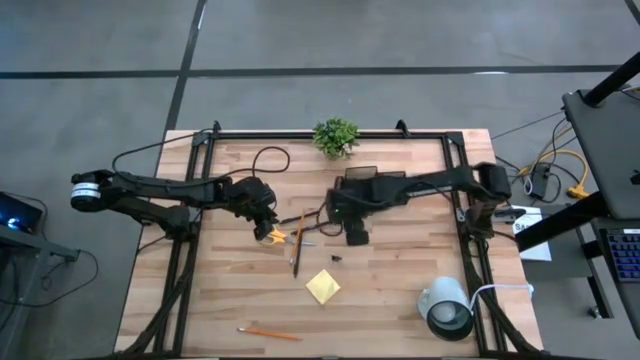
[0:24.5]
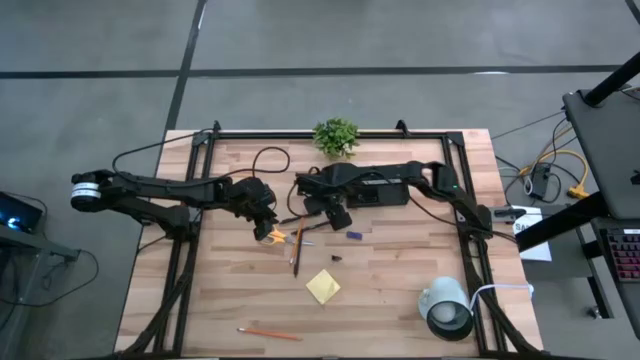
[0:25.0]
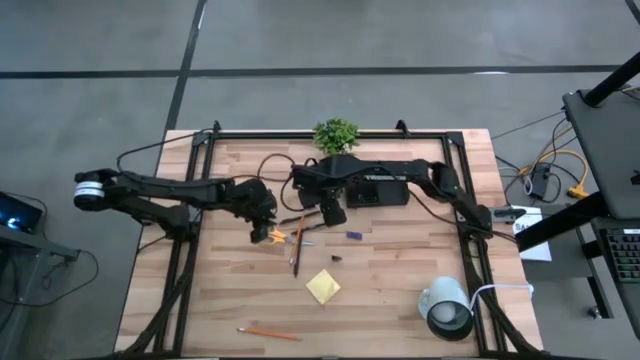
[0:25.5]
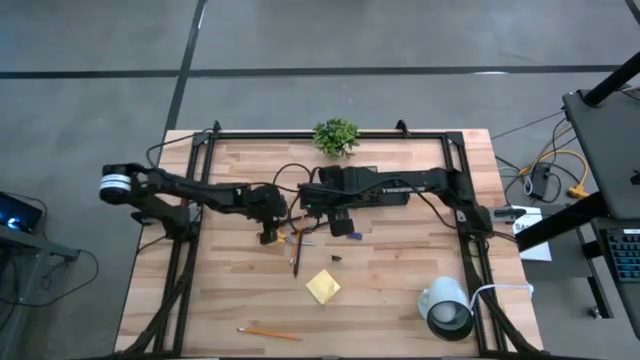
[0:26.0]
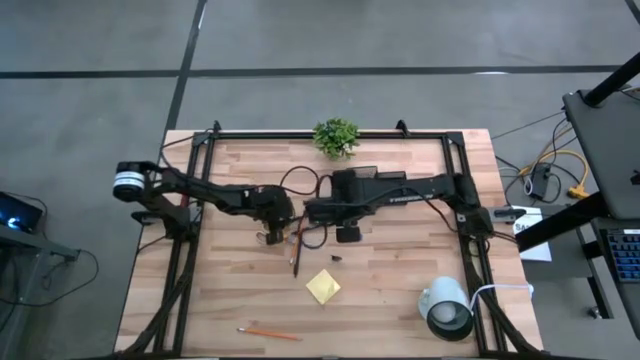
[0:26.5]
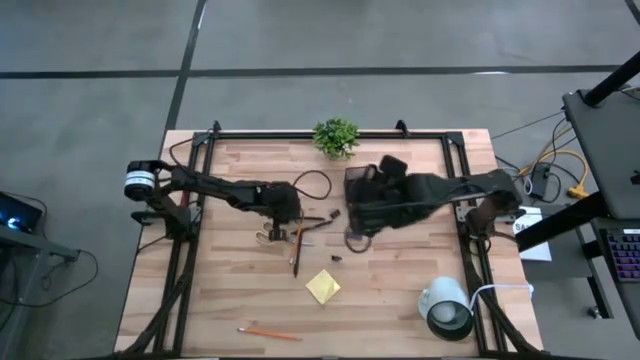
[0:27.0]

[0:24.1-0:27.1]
Task: Pick and place office supplies into organizer
Put the top black pen into the desk organizer

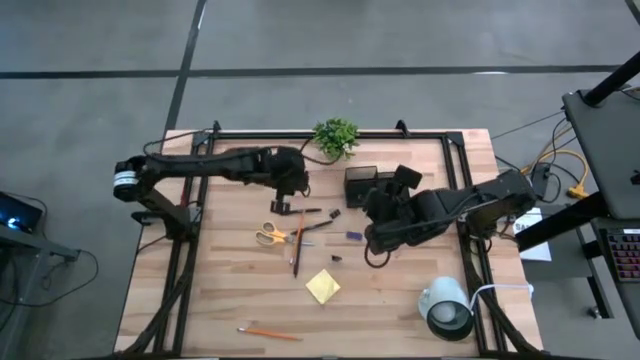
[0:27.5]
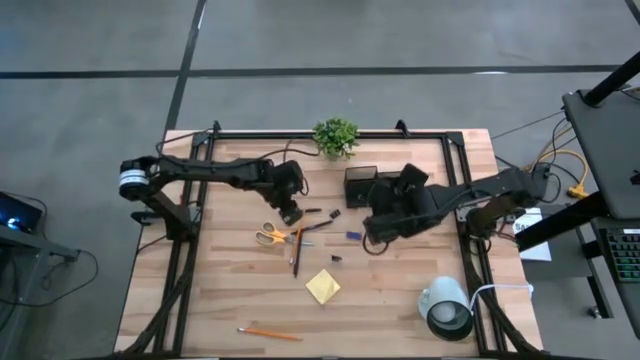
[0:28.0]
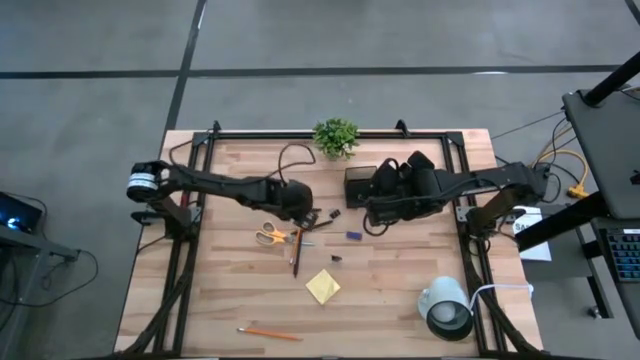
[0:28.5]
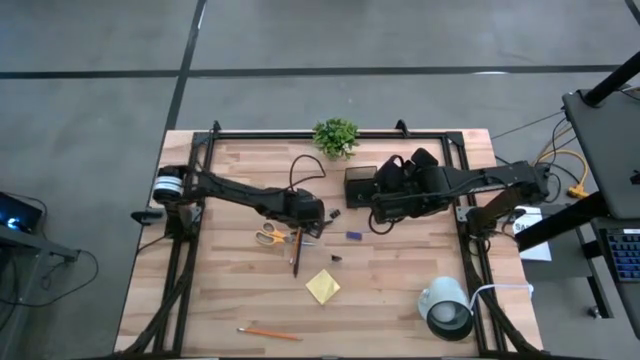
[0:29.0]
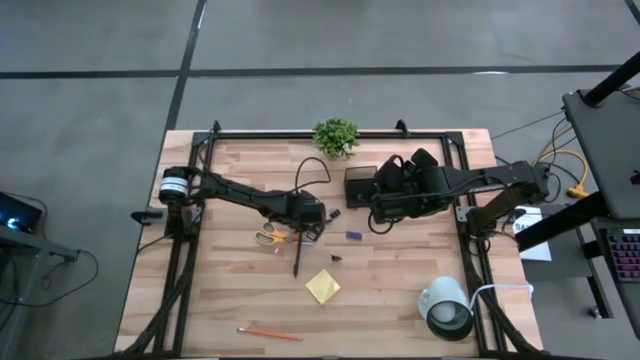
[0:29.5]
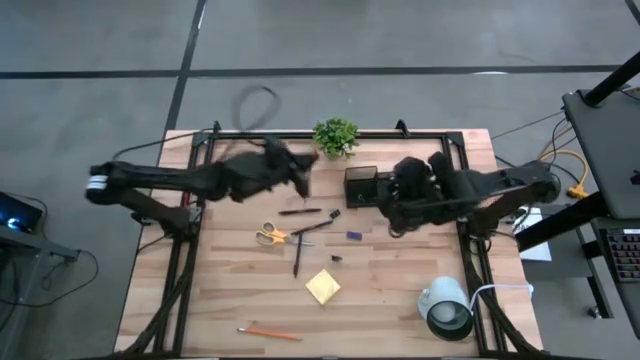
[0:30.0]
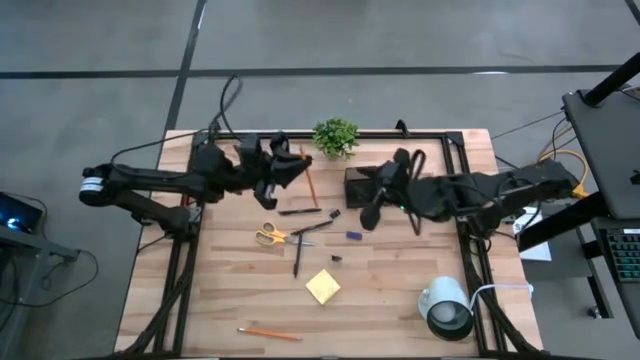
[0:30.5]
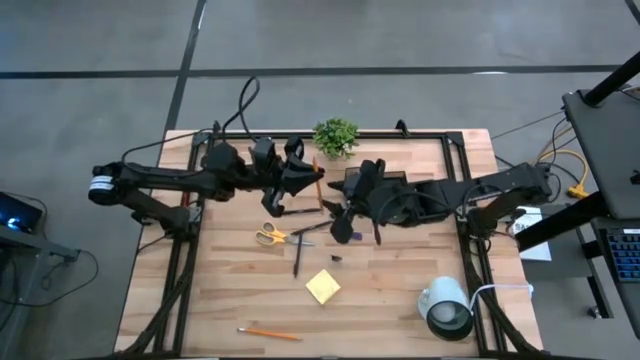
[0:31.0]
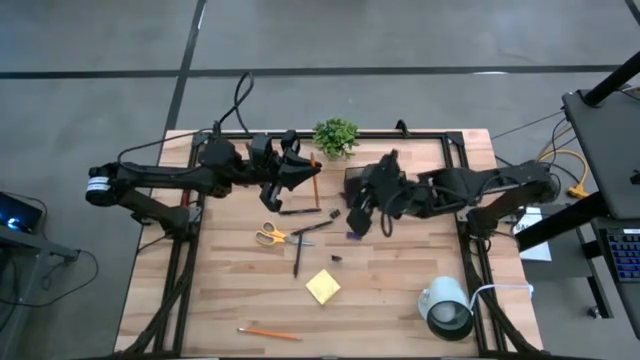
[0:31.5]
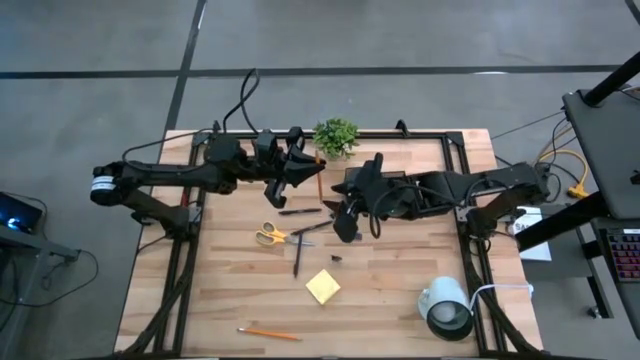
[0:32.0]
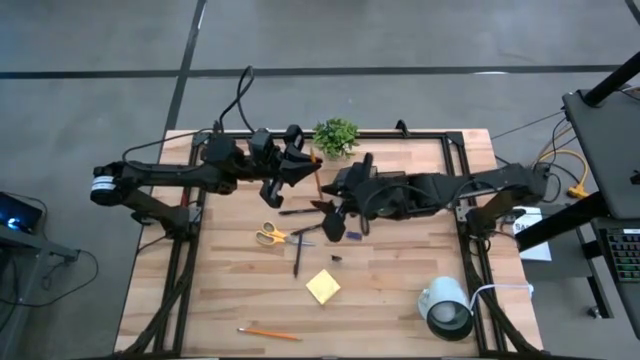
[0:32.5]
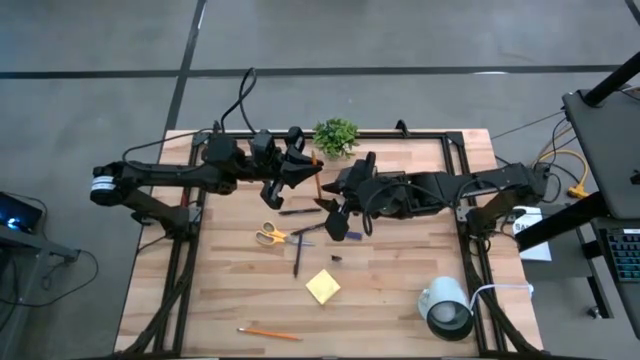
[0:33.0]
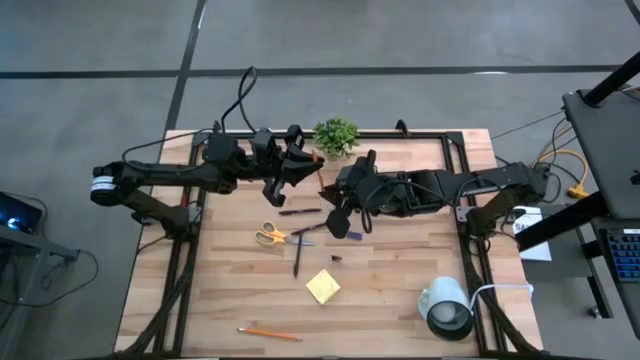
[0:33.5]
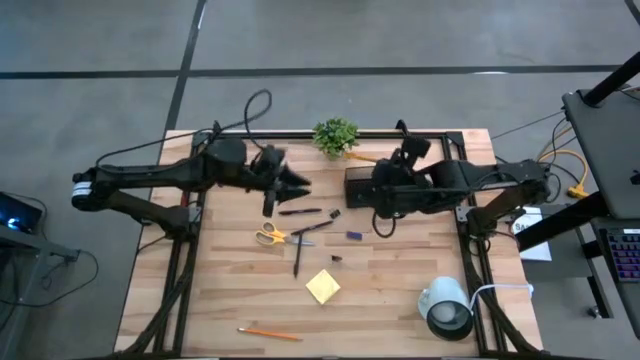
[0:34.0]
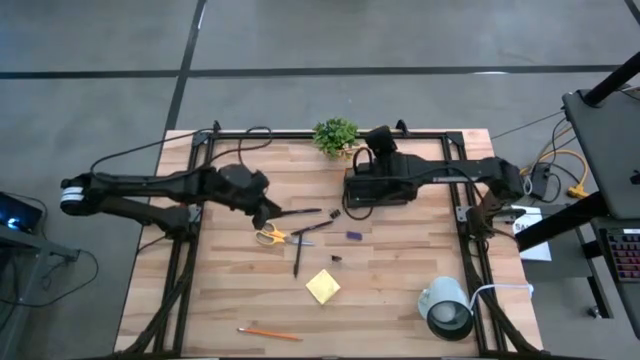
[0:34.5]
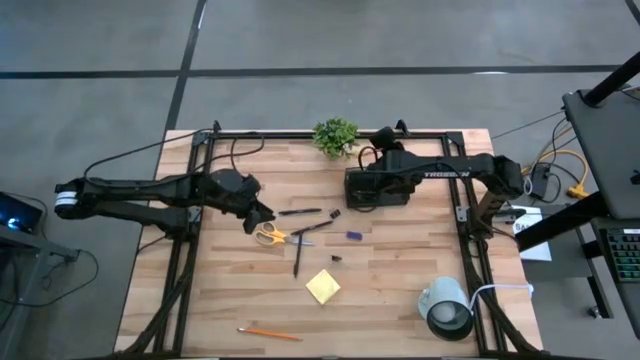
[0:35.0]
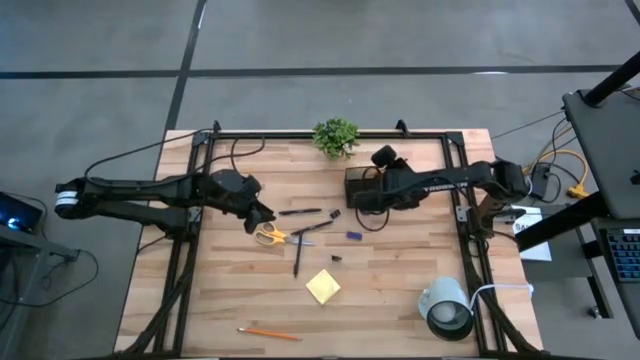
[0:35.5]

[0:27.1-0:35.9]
Put the top orange pencil into the desk organizer

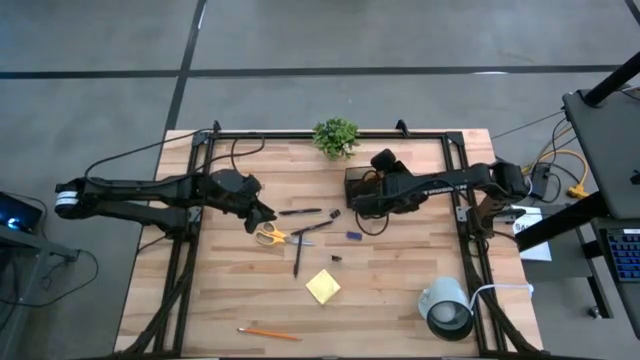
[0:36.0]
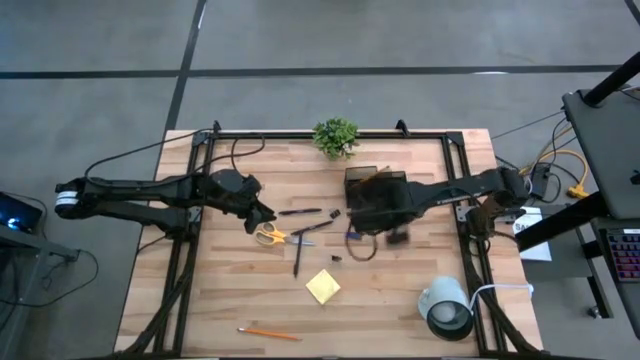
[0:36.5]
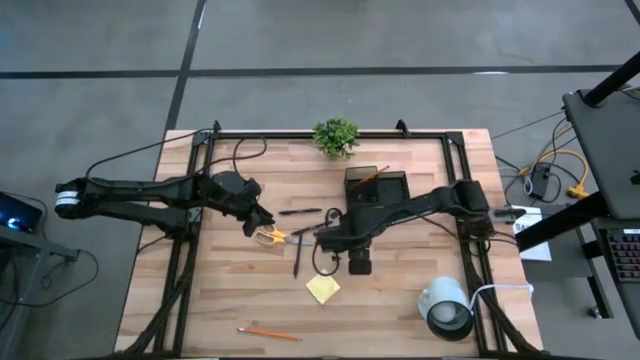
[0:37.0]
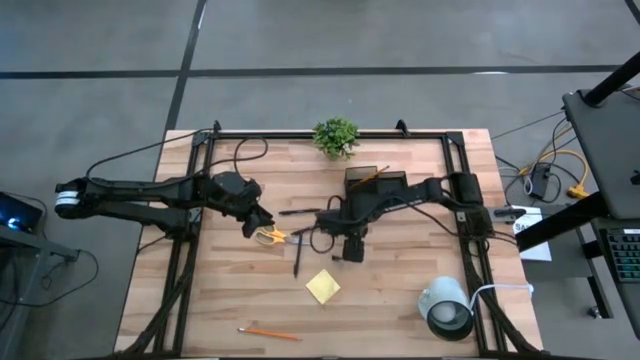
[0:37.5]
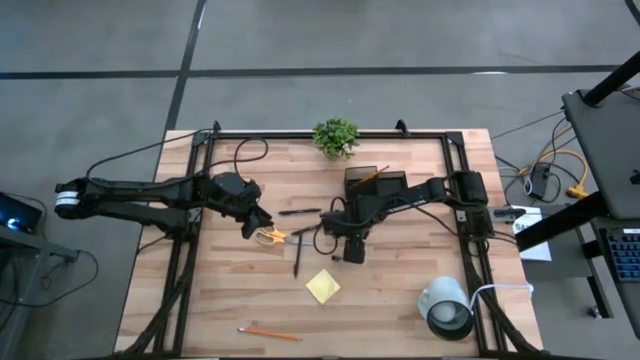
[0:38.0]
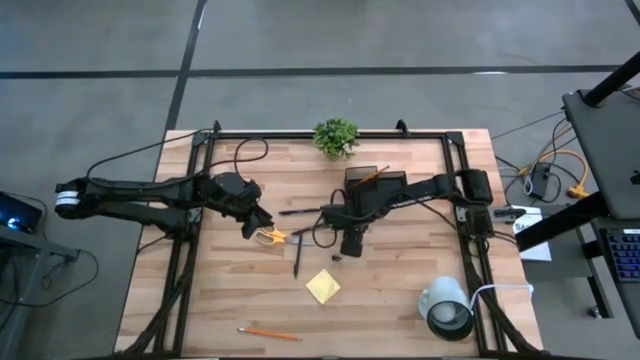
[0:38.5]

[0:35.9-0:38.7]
Put the blue eraser into the desk organizer

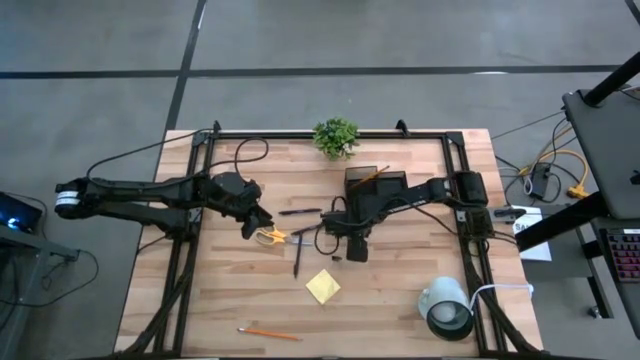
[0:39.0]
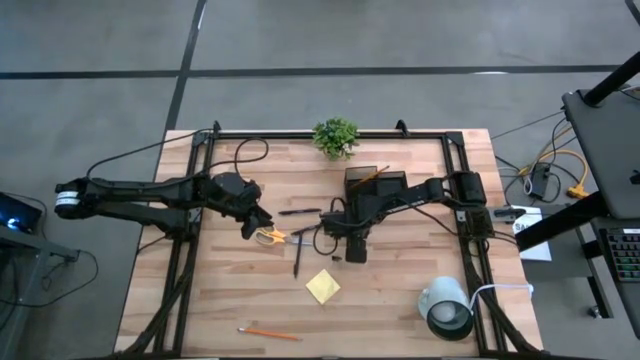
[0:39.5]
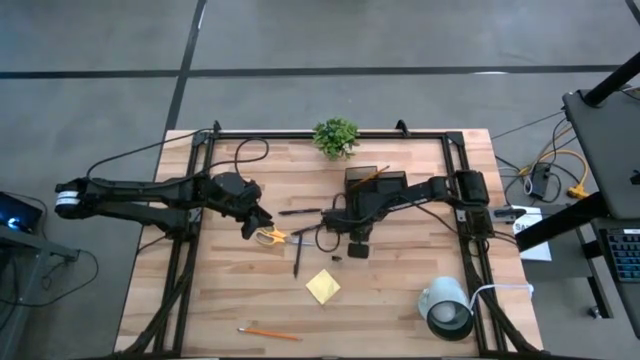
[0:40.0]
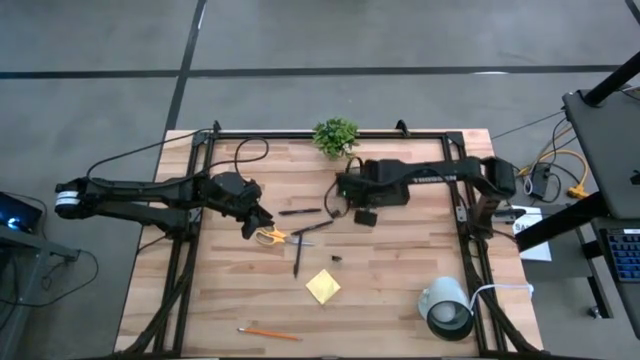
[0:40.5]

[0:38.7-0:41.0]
Put the blue eraser into the desk organizer

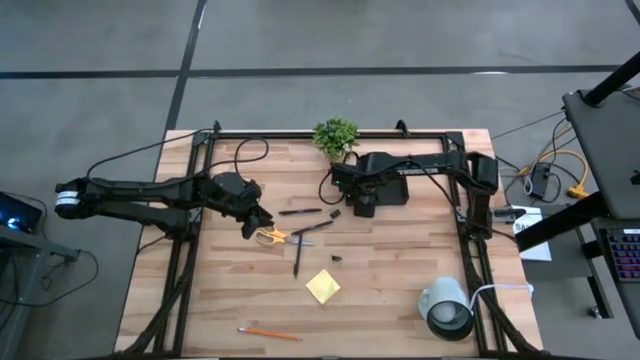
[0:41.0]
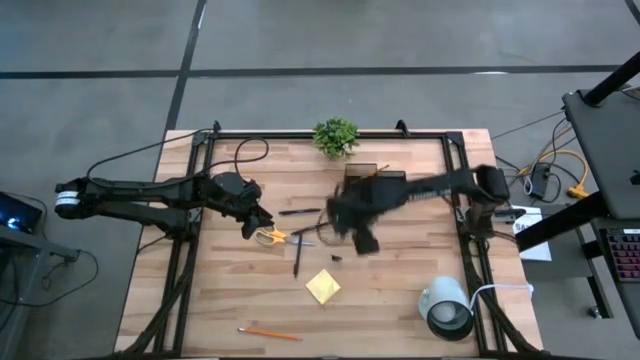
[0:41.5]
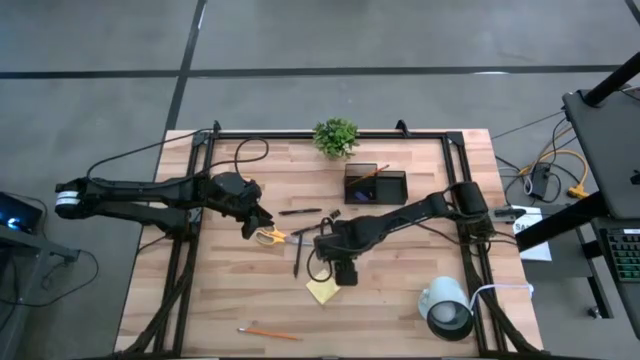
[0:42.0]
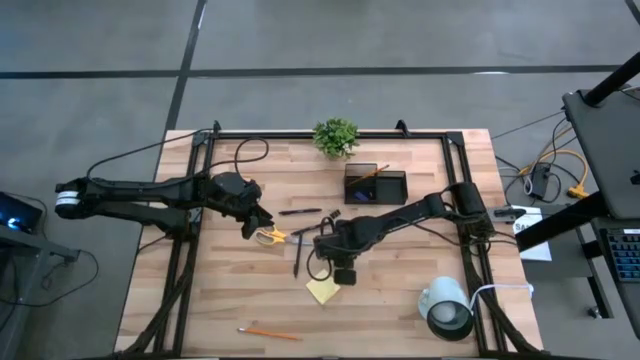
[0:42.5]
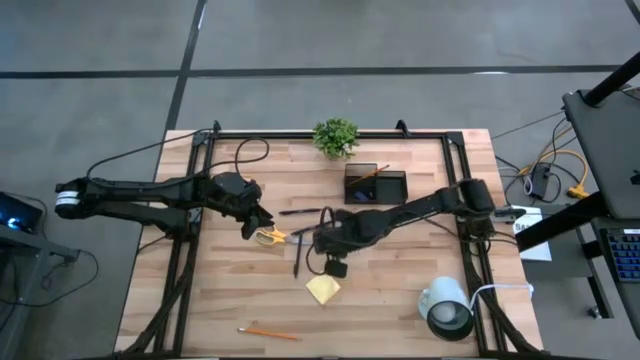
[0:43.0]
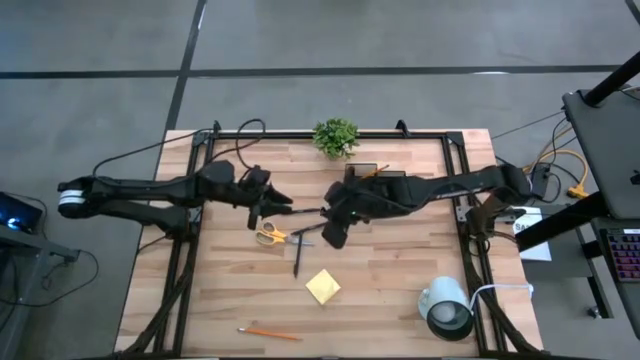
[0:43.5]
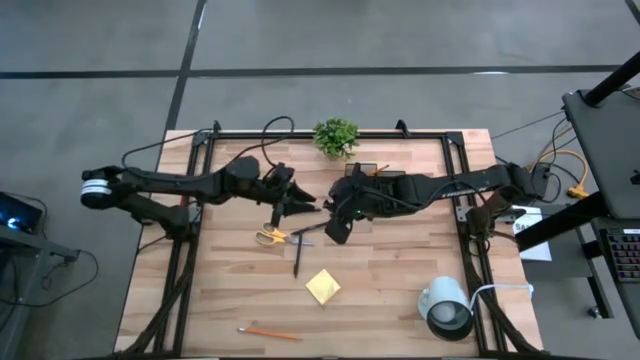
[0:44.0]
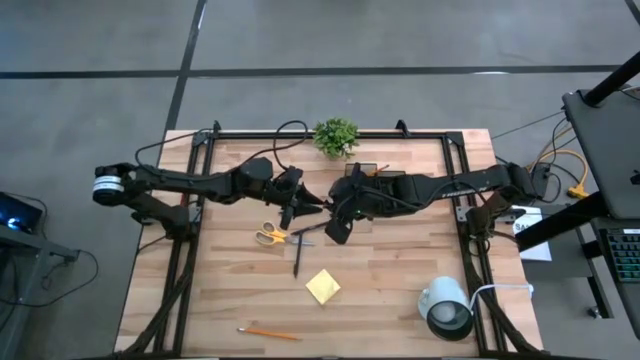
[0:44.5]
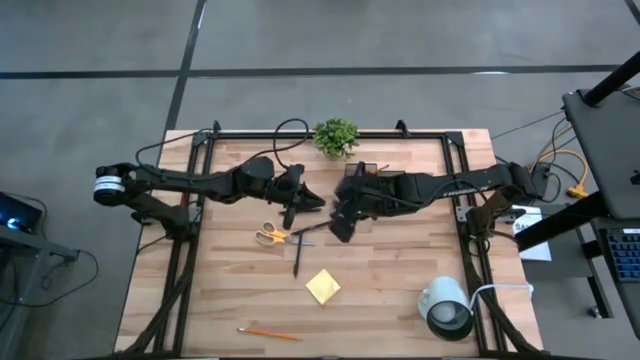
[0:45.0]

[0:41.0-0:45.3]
Put the bottom black binder clip into the desk organizer
